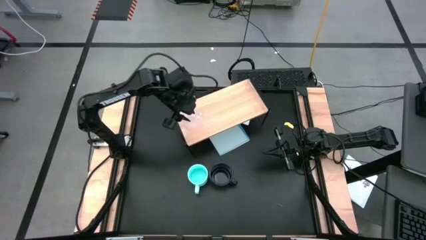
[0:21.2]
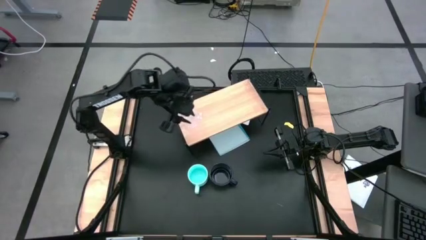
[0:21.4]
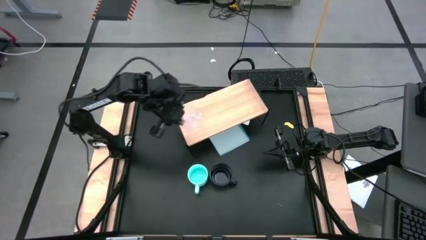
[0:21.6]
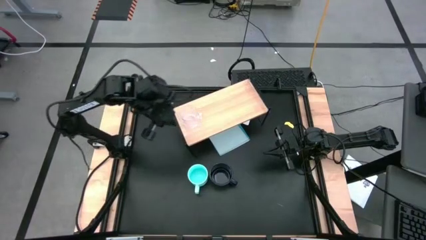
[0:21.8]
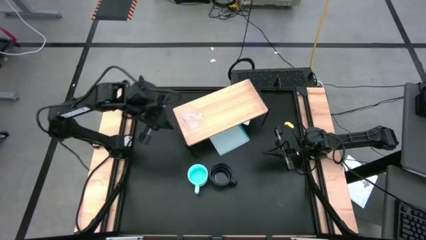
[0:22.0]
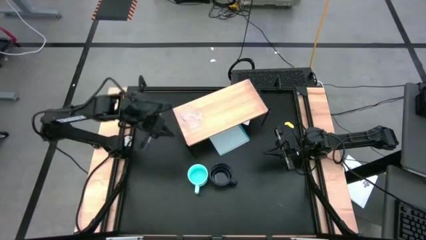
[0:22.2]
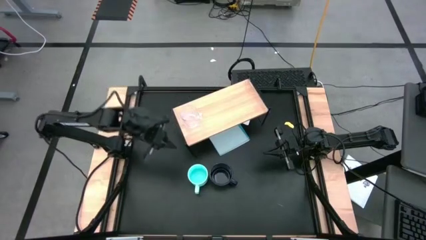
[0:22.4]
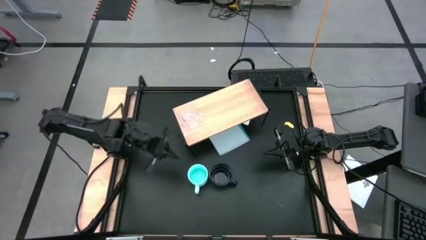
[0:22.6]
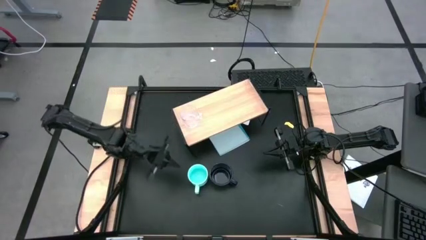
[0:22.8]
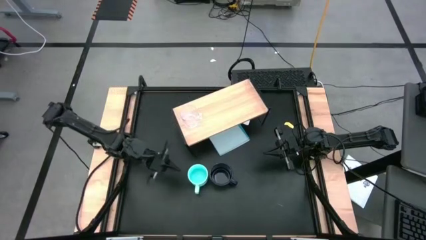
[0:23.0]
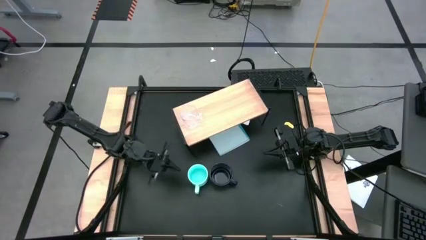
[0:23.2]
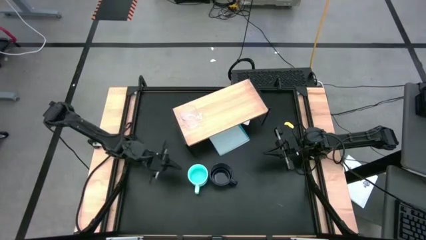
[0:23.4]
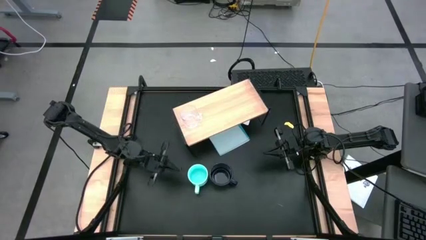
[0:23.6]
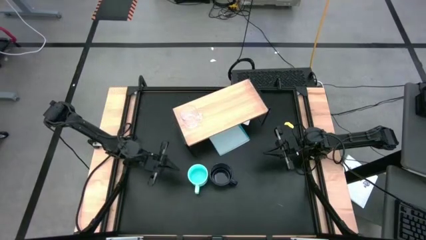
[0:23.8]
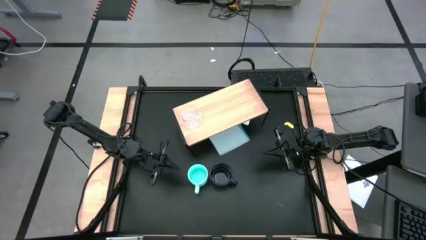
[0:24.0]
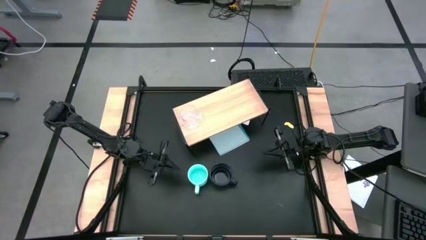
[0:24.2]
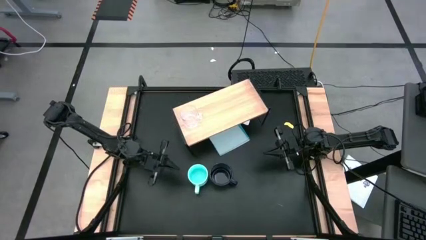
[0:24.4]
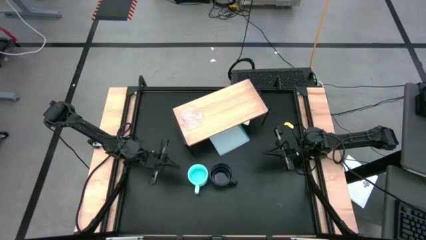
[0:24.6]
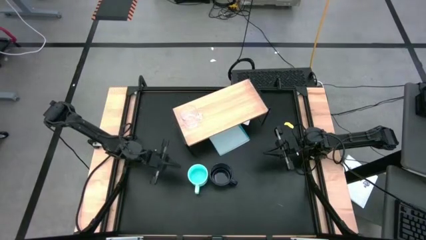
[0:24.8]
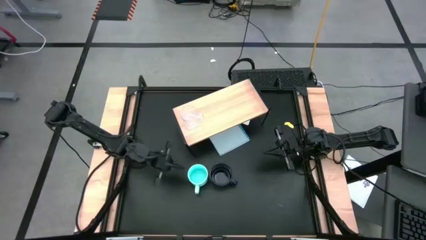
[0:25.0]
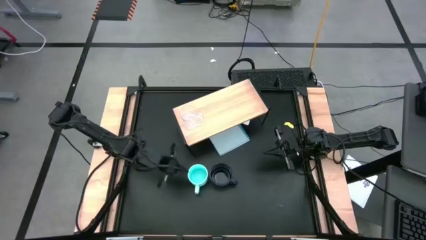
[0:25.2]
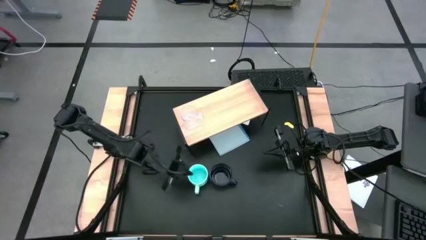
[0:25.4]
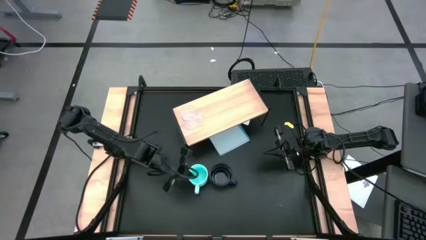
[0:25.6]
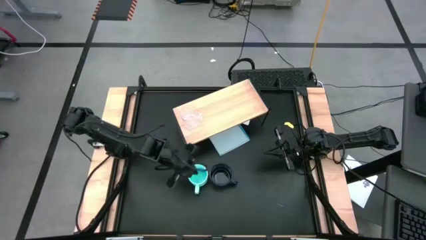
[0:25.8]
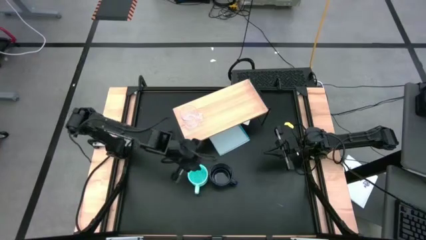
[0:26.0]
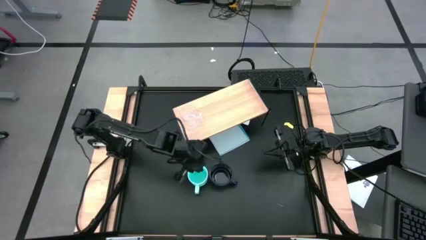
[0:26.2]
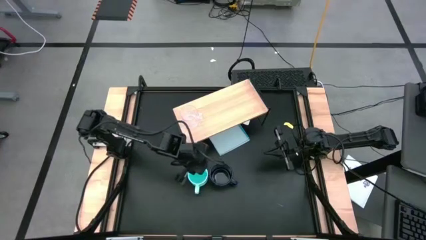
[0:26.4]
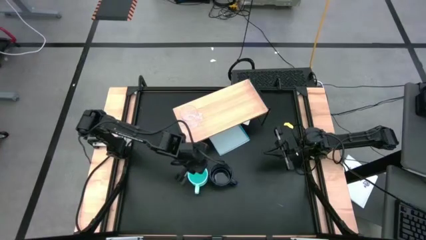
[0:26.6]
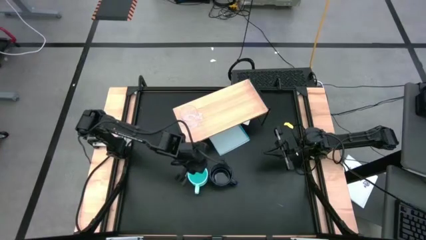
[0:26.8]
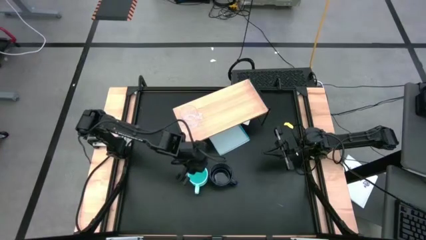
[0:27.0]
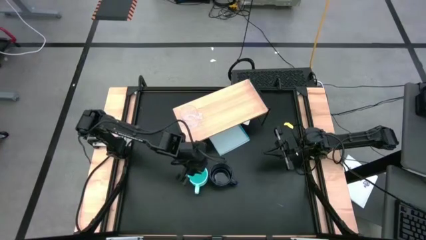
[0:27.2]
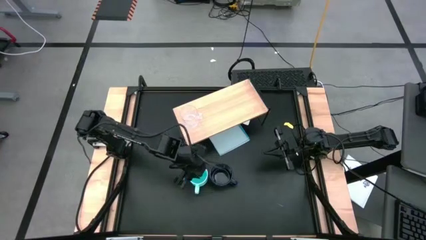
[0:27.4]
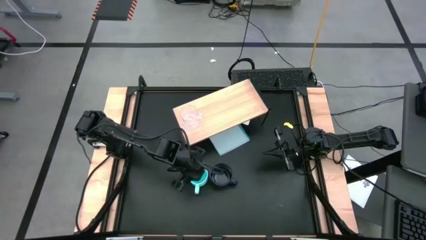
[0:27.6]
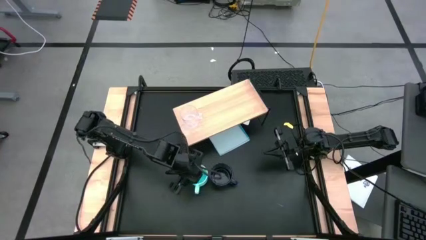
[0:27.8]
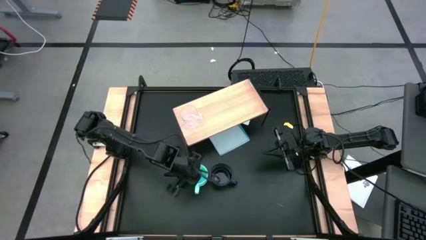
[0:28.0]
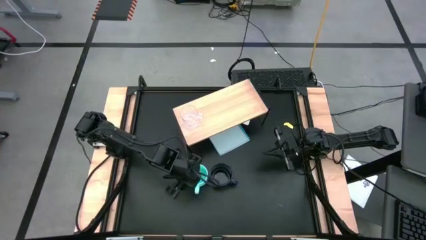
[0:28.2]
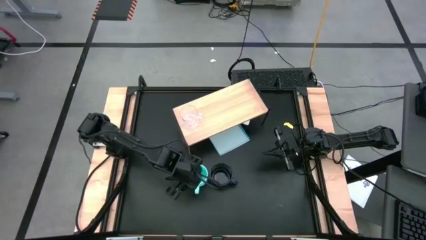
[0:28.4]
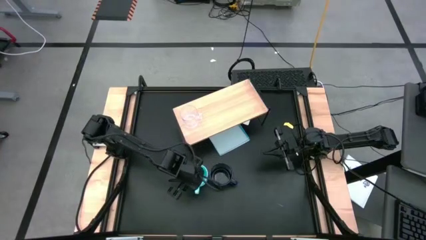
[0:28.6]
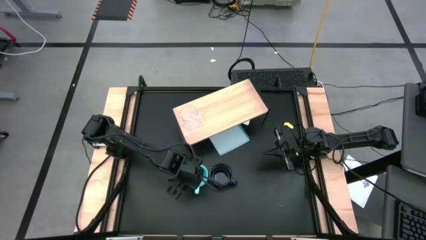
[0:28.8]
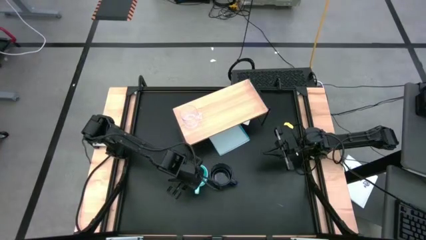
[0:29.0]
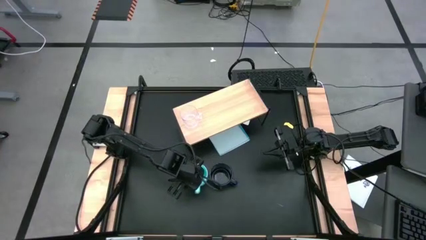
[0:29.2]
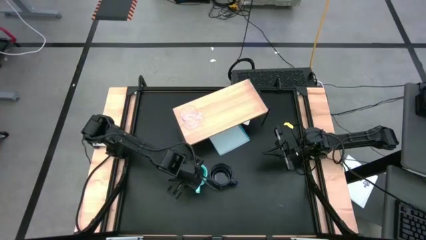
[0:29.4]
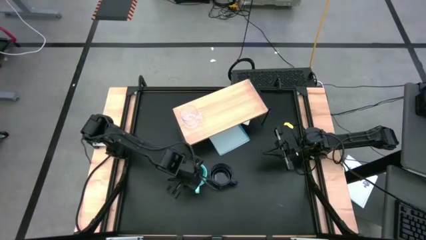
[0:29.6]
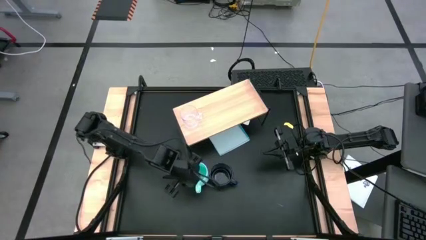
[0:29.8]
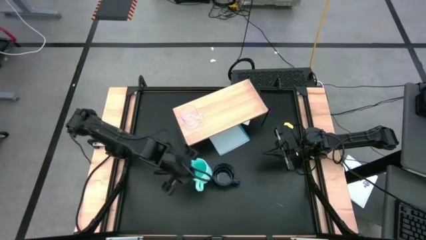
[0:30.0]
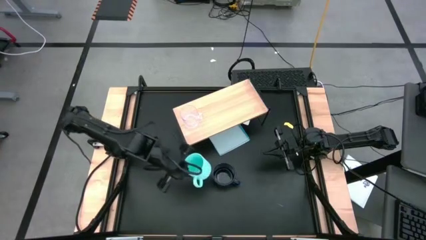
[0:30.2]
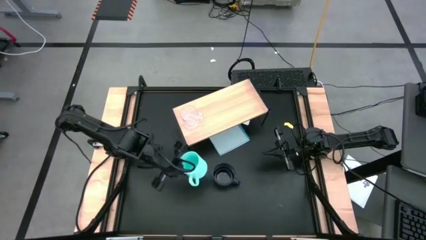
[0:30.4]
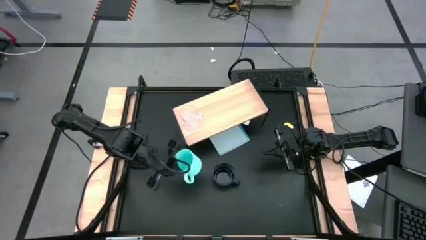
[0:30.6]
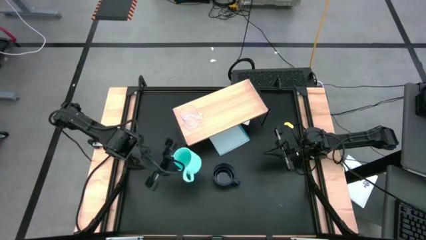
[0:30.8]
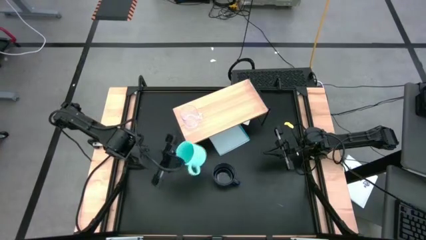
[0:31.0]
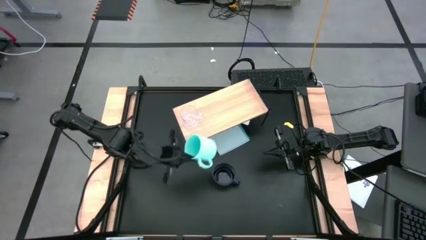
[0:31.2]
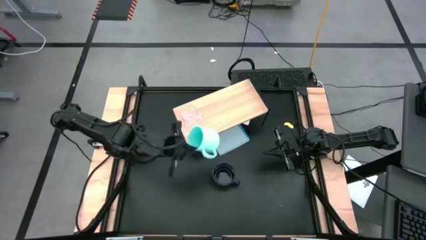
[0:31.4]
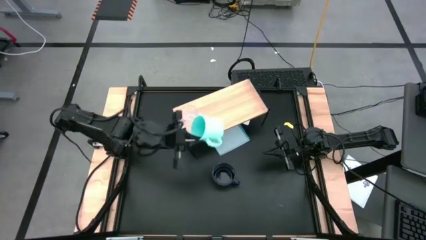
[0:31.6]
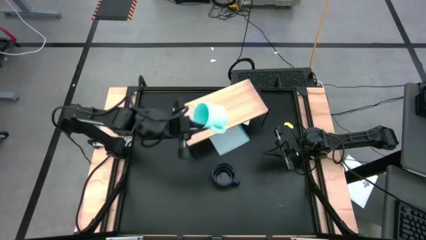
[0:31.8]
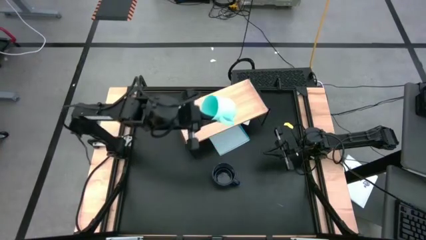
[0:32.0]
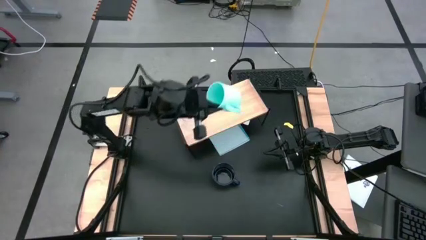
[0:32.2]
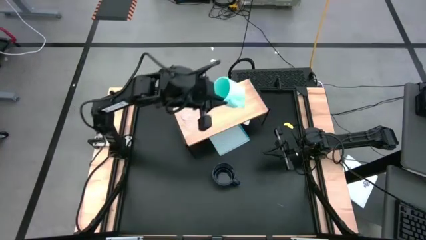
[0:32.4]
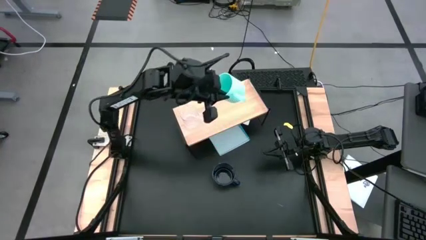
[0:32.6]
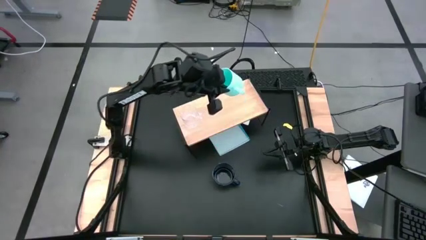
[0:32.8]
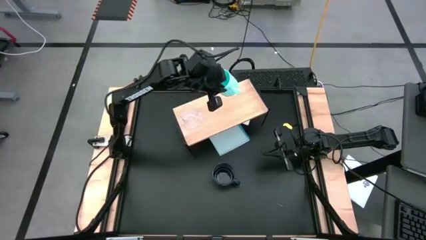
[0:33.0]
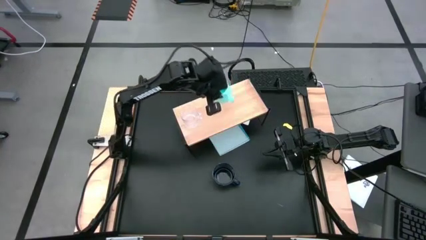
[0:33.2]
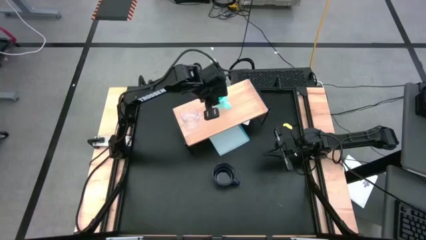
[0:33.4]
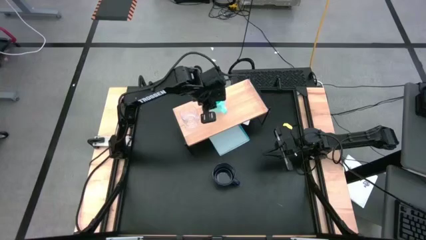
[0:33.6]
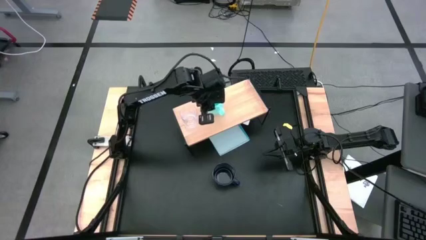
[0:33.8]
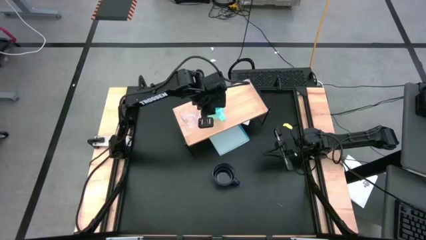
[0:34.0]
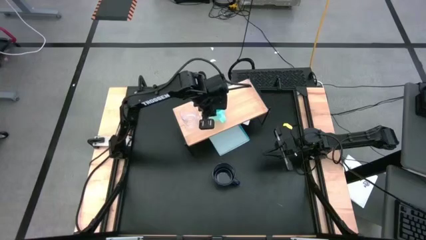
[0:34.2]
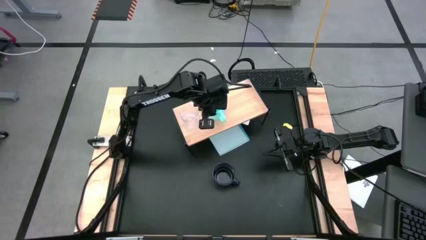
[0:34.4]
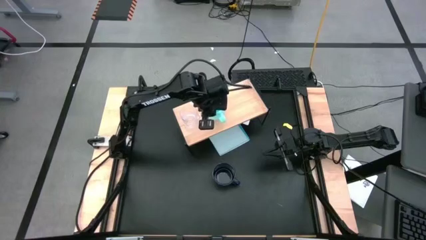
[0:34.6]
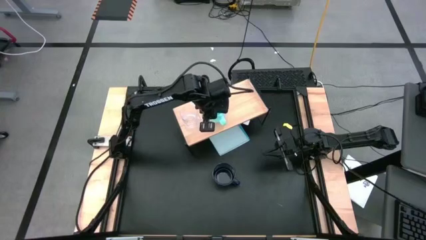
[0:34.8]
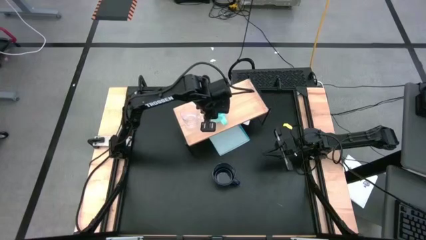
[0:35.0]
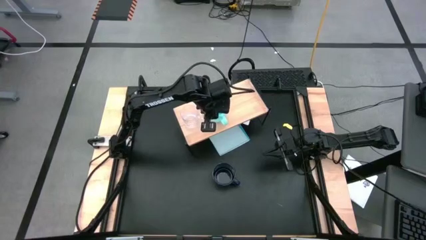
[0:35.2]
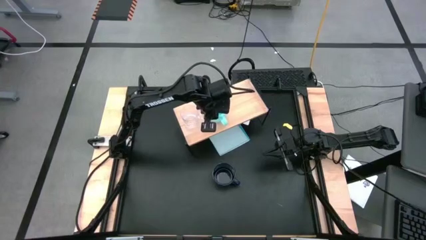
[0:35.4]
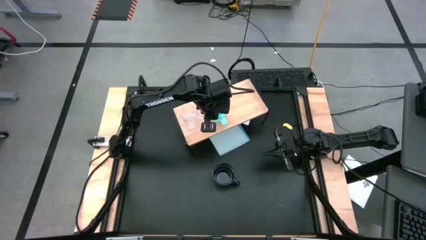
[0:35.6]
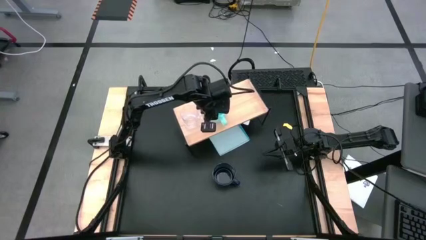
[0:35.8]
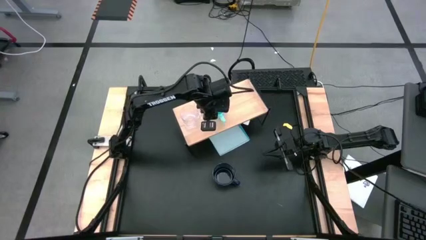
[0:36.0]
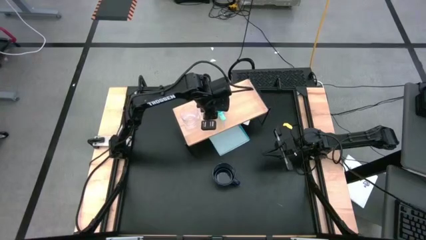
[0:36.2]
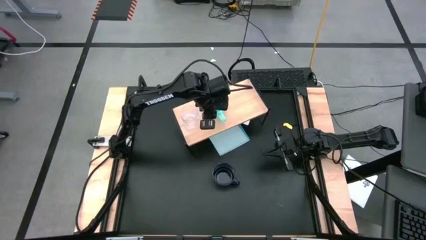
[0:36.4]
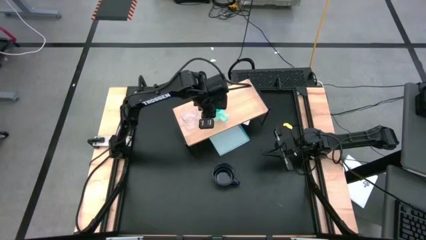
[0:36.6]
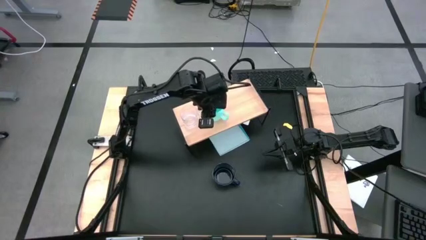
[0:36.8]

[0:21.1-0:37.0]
Task: Stack small to large cups/mugs on shelf
Put the blue mug on the shelf
